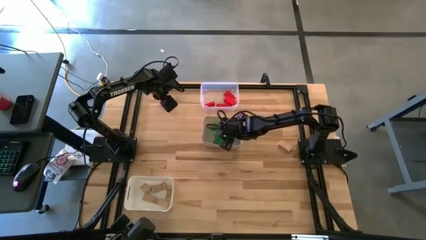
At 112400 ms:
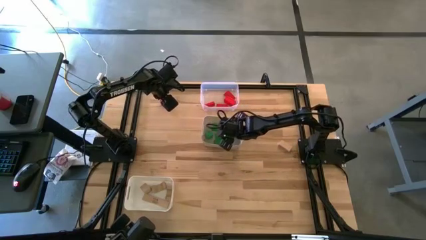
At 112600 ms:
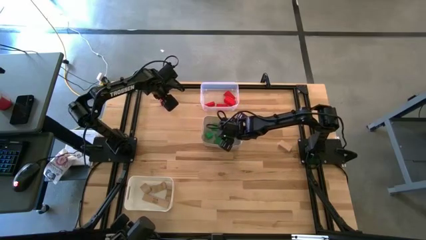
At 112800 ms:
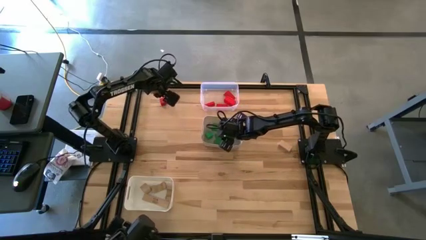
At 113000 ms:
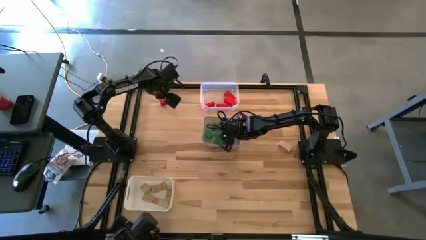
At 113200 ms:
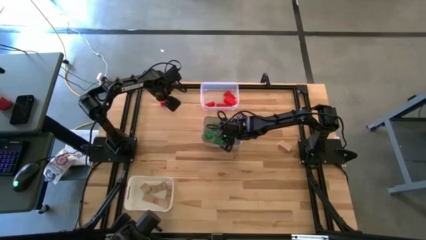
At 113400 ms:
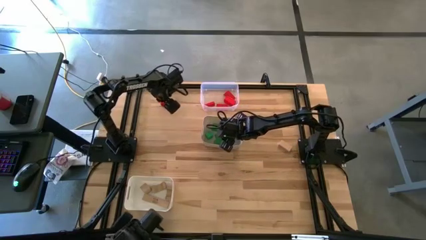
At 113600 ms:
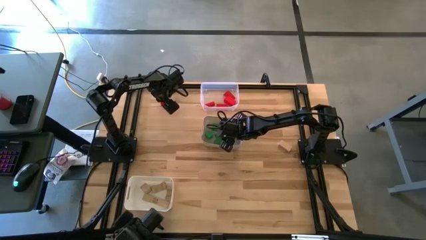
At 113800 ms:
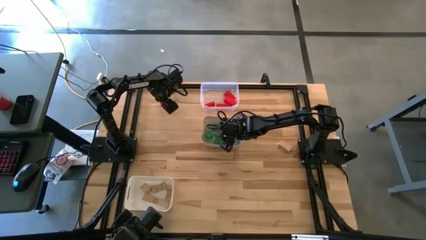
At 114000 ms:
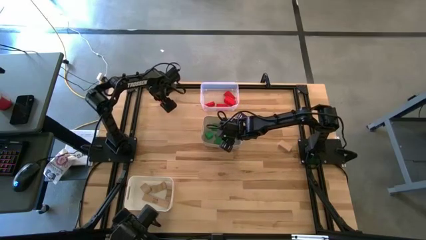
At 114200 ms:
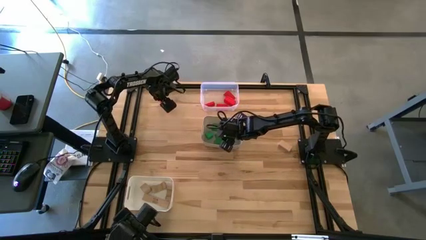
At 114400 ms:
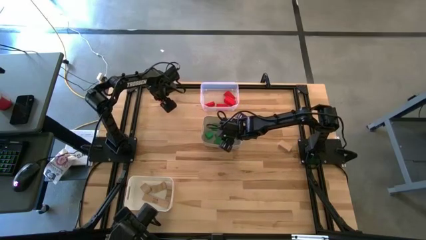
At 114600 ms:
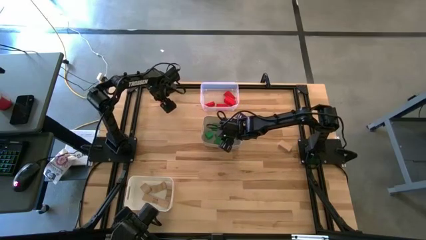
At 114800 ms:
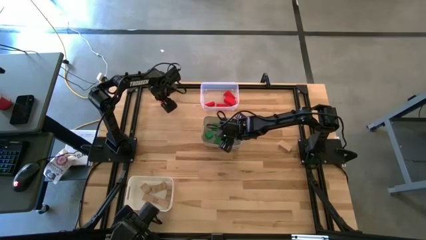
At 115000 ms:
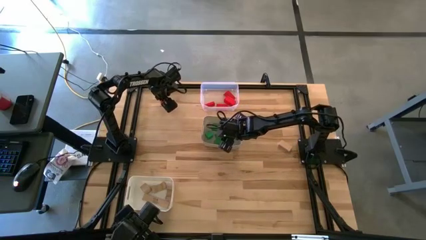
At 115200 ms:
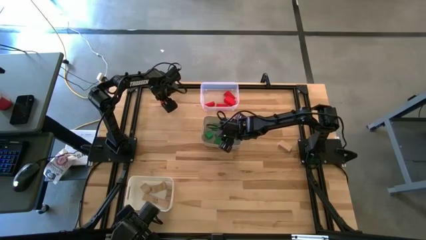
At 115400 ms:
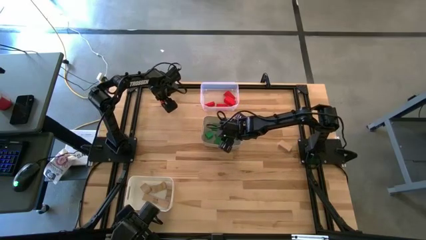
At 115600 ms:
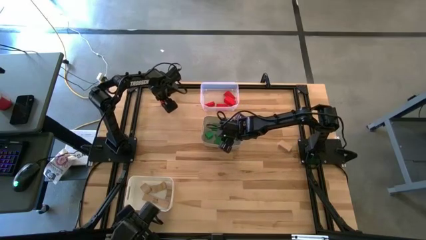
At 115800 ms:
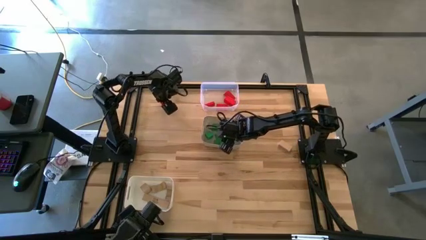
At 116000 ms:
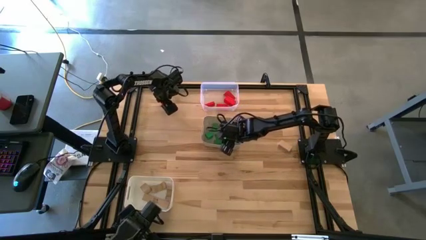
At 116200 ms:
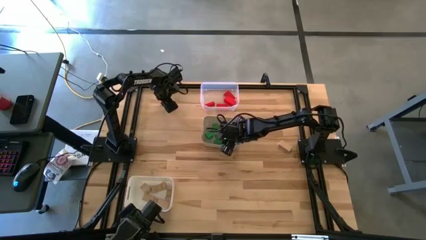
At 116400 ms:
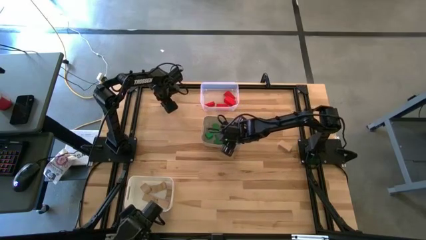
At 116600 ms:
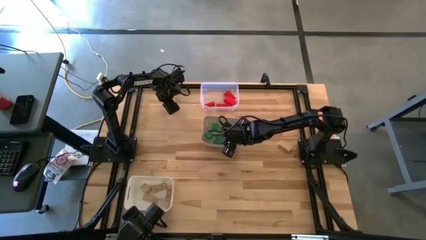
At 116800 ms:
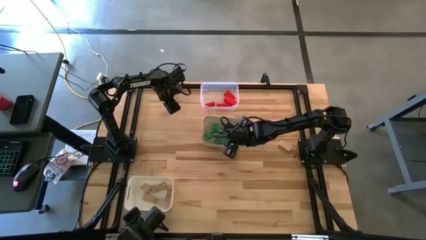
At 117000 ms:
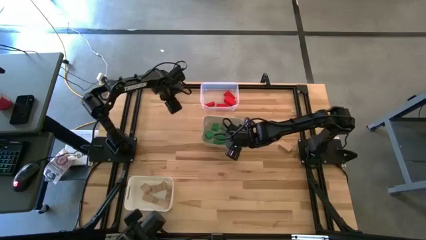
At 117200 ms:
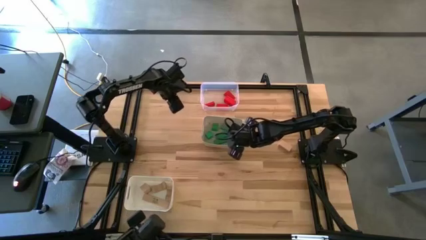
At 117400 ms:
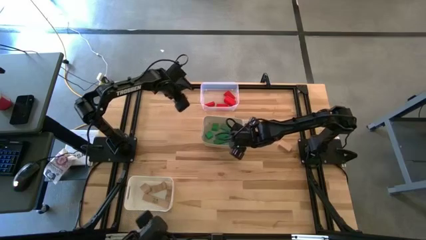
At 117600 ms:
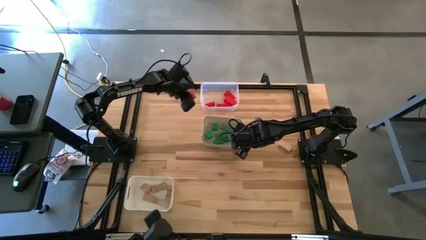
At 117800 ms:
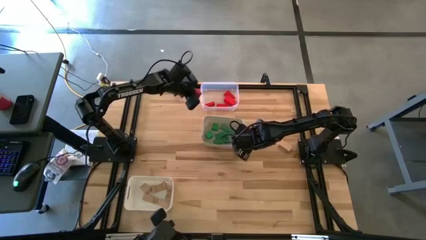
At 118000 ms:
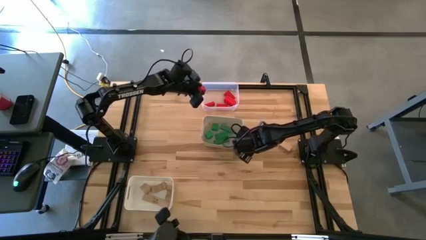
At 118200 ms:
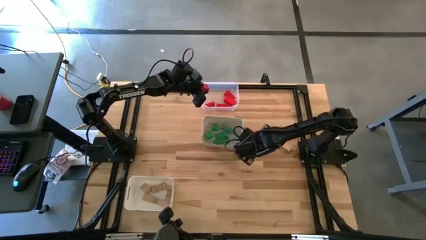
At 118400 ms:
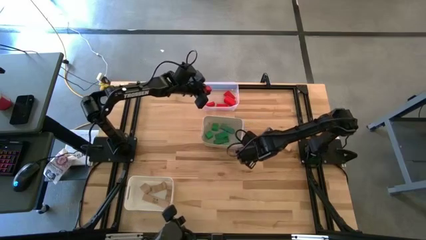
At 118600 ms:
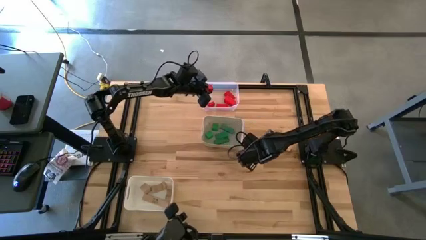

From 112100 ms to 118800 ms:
Task: Sort & place blocks by color
Put the red cube block into the transparent bin

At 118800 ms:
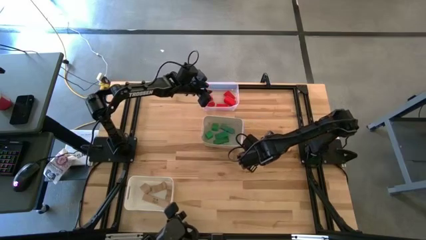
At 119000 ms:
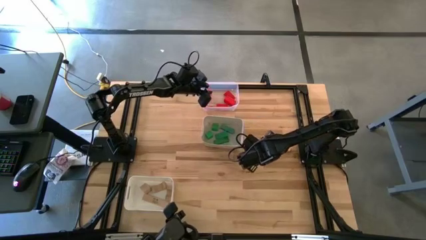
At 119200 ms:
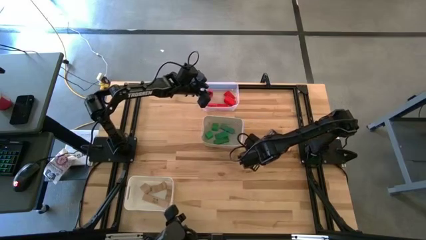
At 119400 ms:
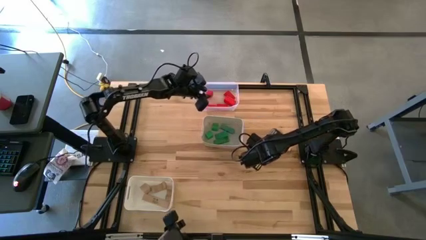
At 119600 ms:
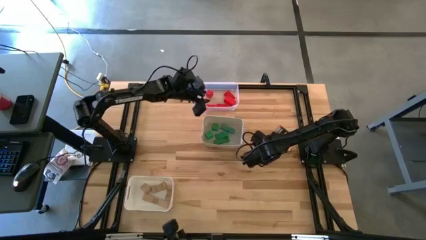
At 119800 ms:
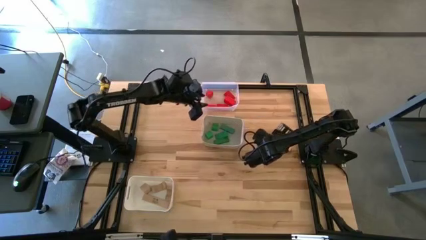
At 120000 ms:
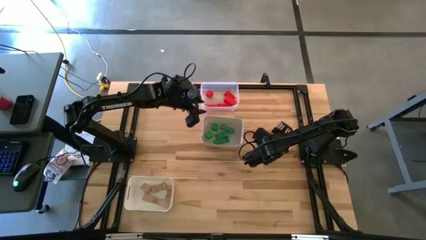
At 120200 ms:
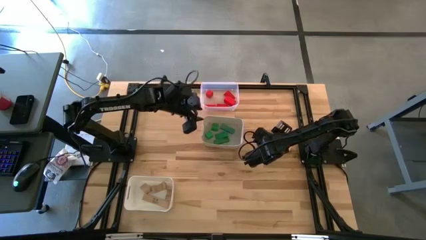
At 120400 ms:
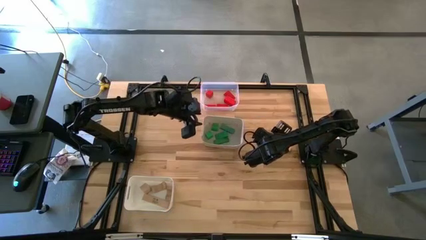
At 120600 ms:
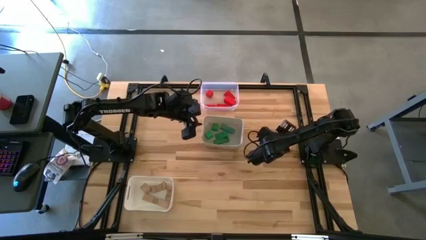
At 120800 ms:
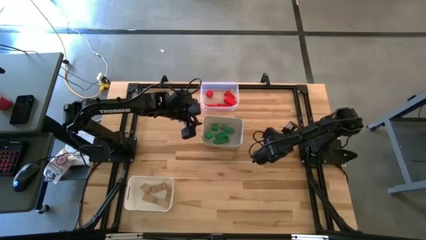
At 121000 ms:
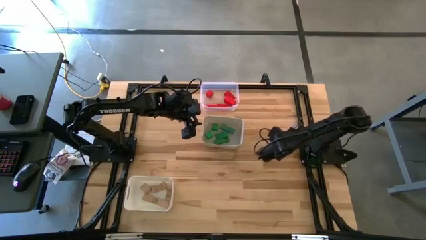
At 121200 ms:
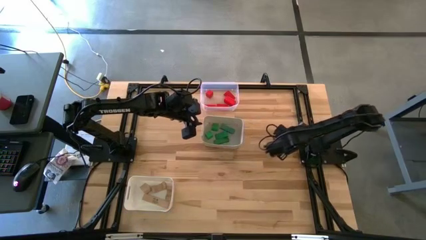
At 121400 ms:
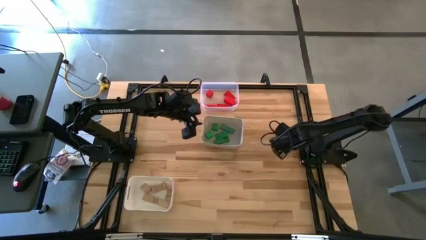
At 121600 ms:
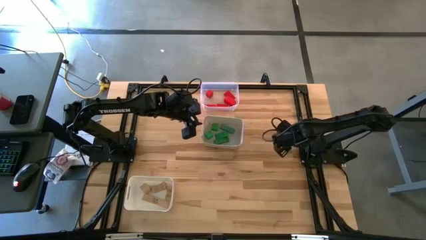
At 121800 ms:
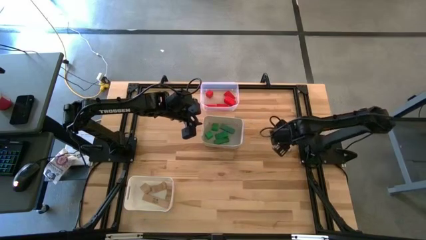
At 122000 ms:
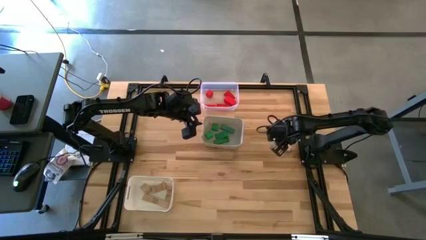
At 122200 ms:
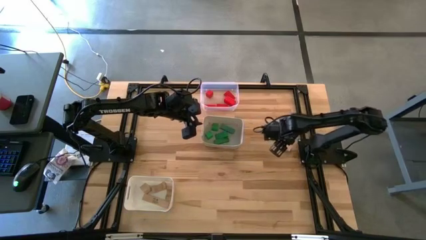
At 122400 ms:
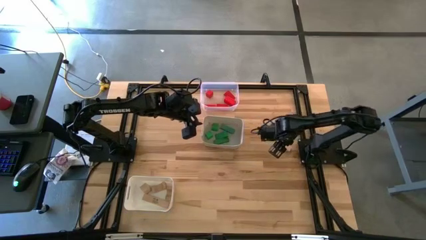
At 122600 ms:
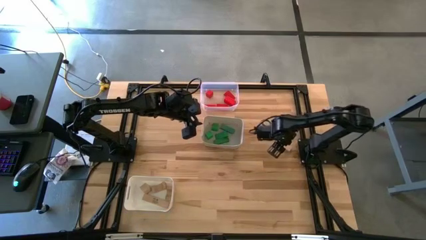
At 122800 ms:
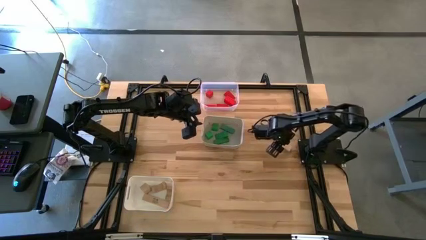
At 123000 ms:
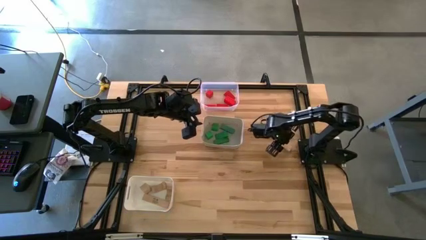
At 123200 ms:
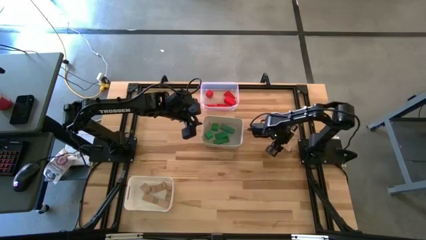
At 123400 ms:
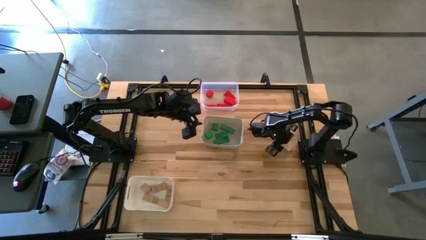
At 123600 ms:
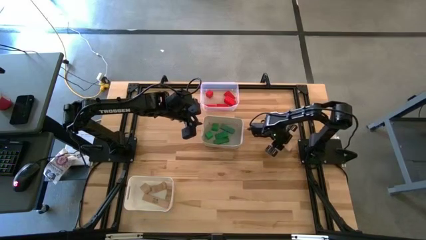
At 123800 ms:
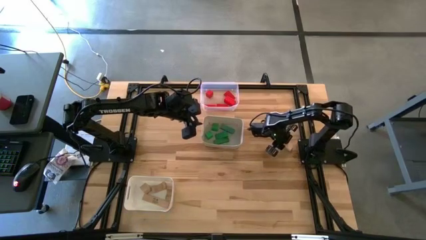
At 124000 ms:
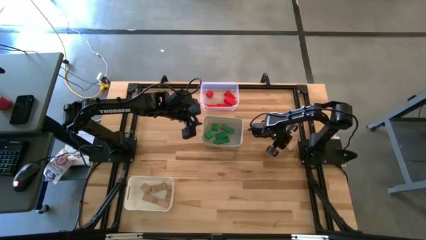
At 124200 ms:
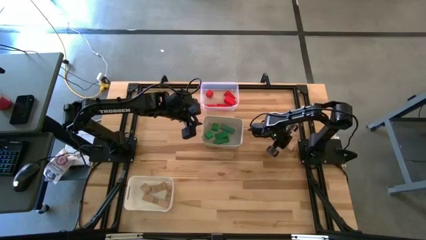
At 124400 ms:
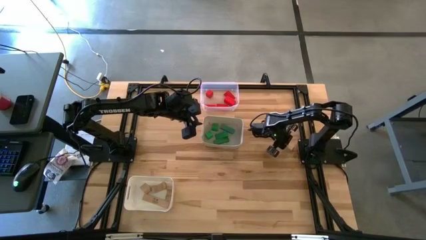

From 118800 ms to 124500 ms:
Put the brown rectangular block into the bottom white bin

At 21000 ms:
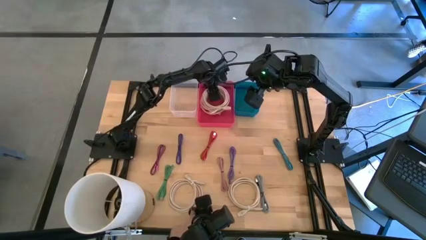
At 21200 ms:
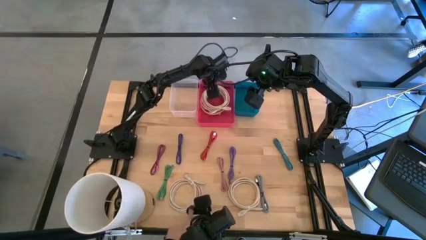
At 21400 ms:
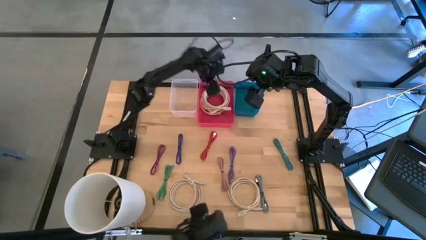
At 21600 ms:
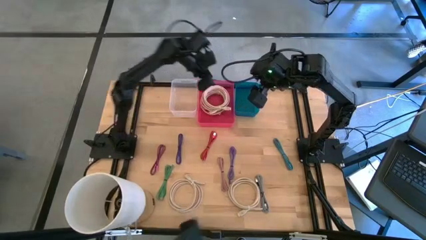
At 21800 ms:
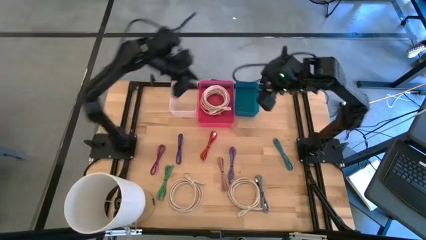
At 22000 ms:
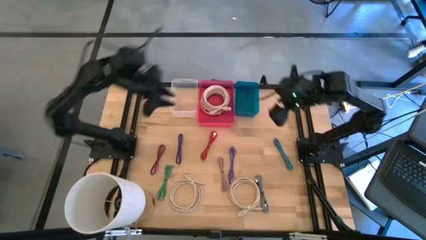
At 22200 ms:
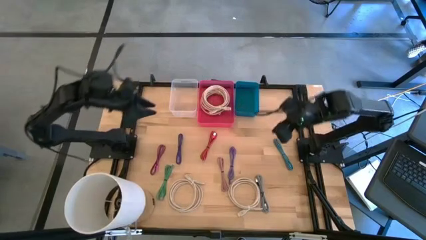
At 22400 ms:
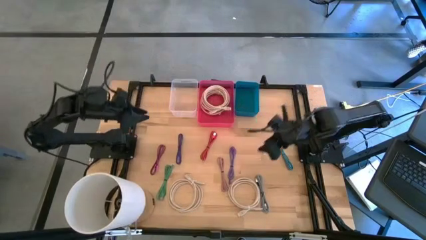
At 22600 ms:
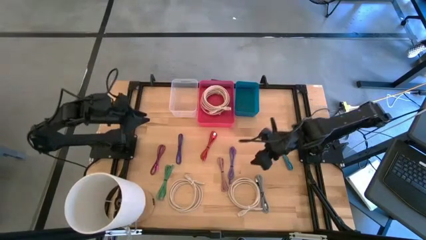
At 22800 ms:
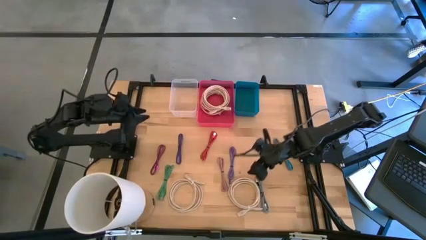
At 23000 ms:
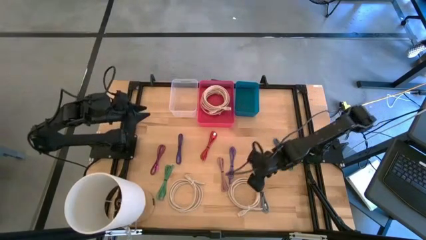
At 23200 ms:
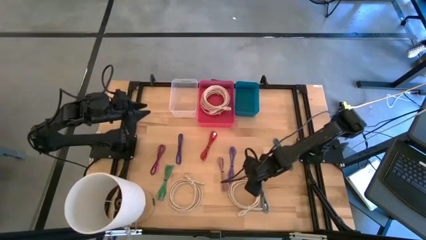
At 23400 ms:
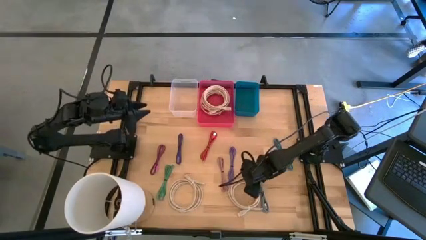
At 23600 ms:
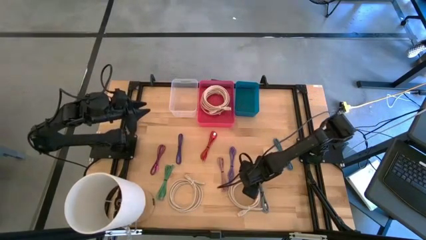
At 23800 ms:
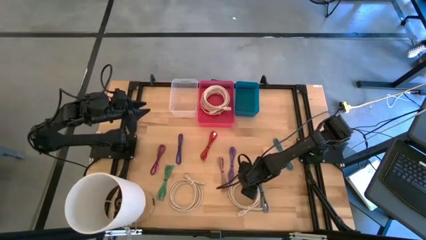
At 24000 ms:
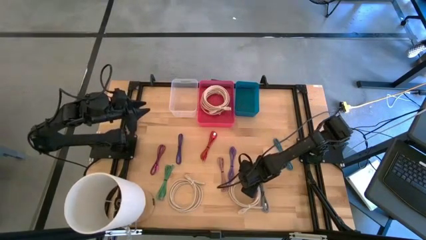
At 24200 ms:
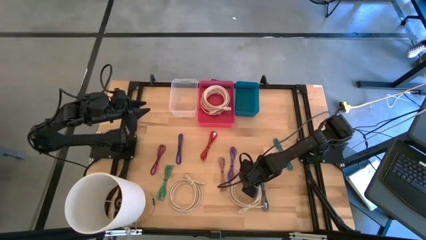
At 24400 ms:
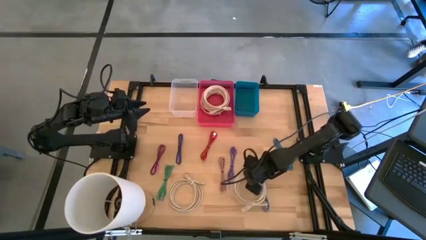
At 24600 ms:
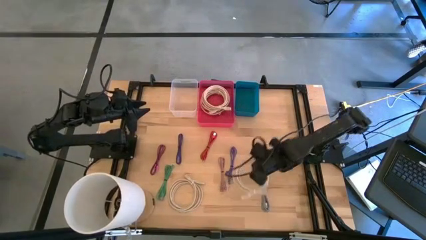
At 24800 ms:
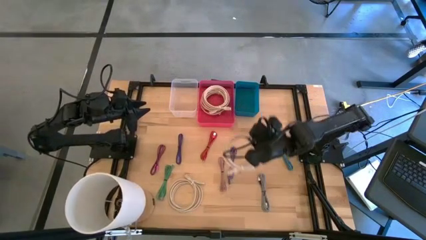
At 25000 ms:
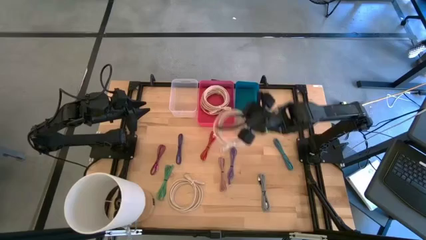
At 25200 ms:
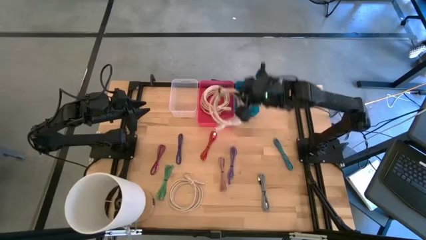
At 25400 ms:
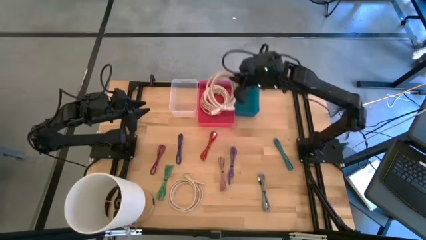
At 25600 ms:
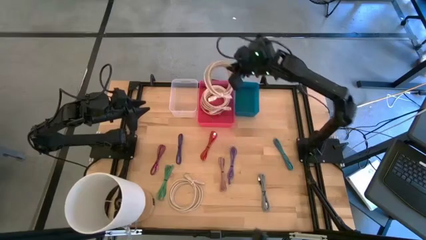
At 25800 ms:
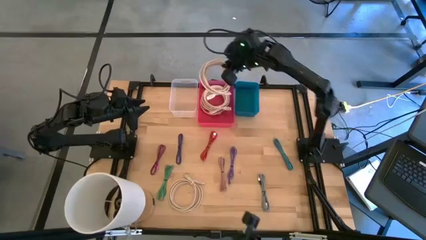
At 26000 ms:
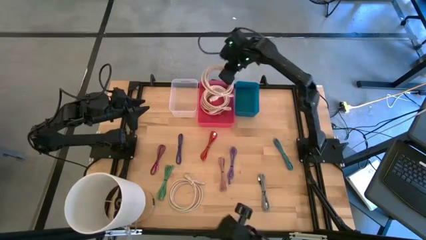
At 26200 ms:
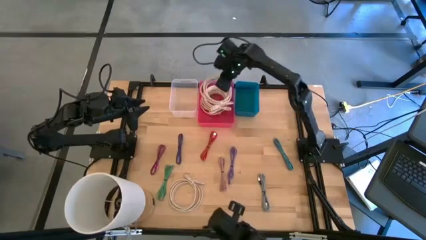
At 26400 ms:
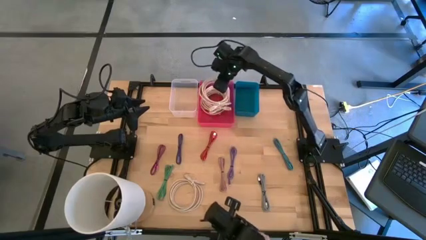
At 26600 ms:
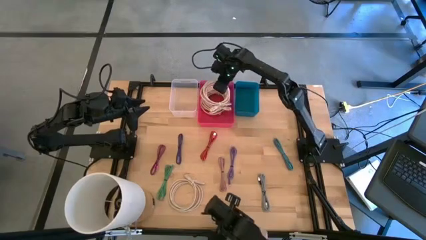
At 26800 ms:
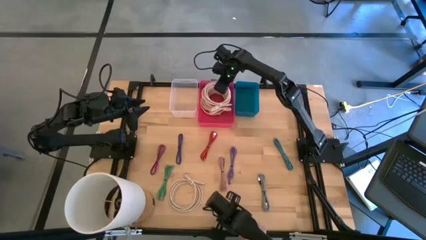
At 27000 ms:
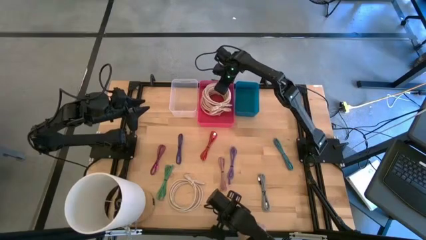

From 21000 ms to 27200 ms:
Task: Pick & Place USB Port
Put the white HDMI cable into the pink bin
